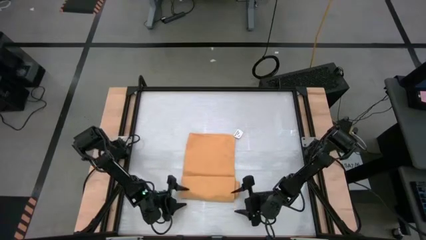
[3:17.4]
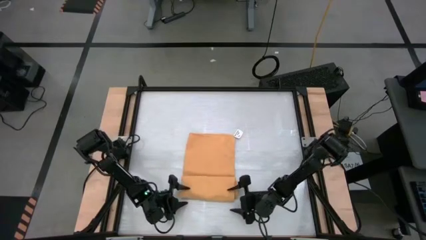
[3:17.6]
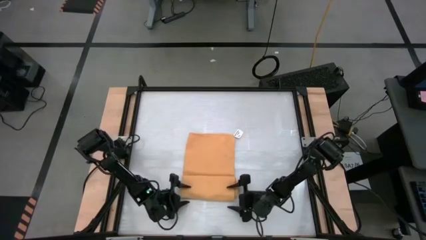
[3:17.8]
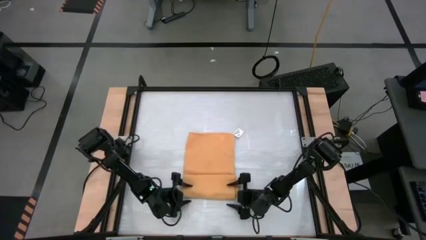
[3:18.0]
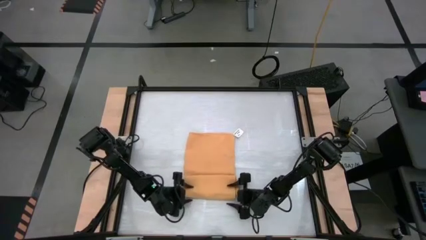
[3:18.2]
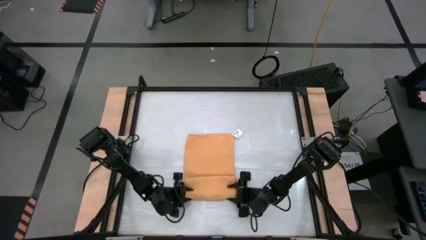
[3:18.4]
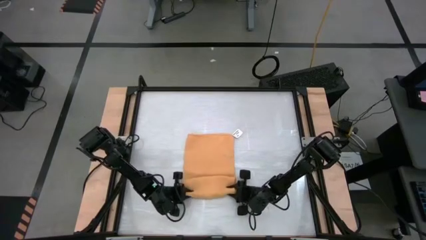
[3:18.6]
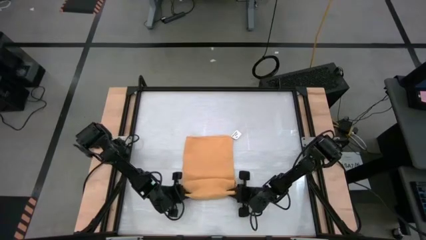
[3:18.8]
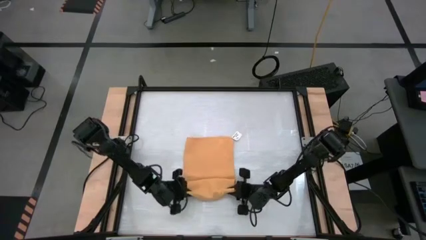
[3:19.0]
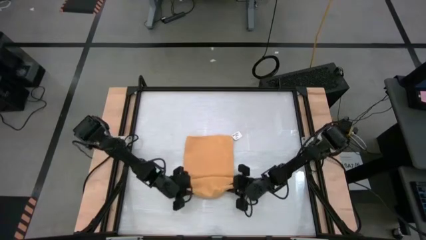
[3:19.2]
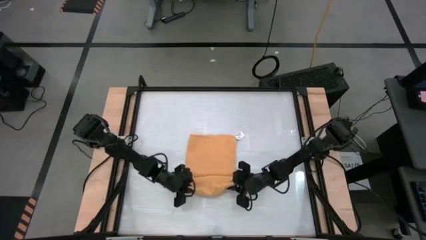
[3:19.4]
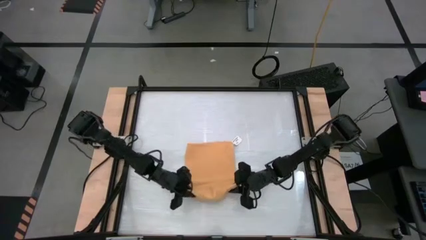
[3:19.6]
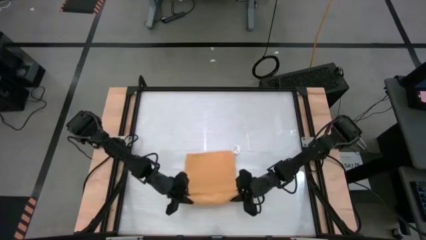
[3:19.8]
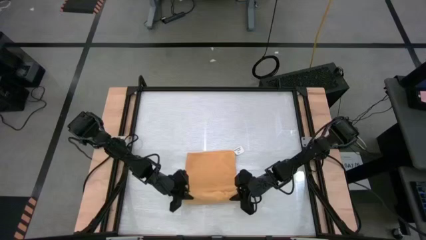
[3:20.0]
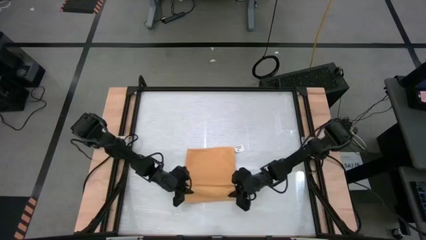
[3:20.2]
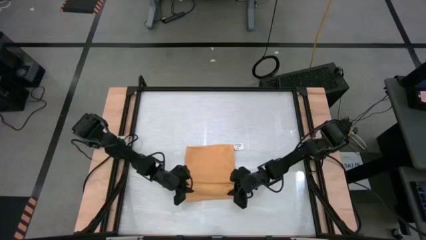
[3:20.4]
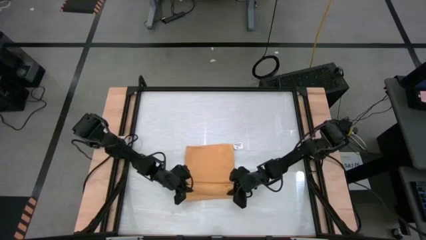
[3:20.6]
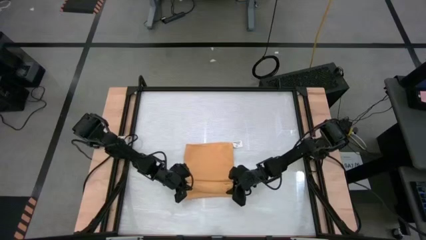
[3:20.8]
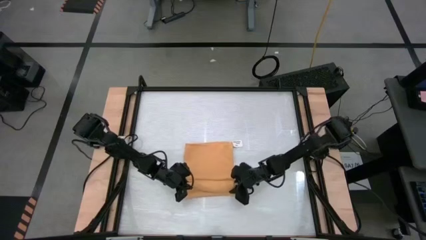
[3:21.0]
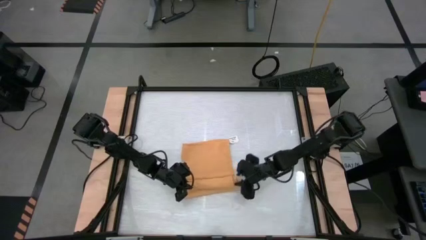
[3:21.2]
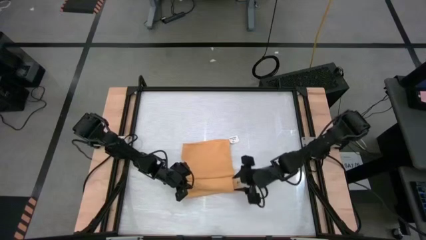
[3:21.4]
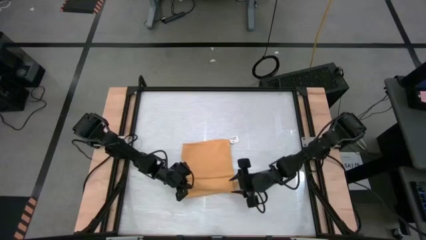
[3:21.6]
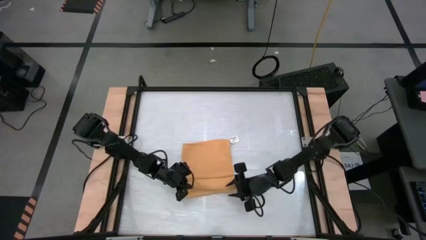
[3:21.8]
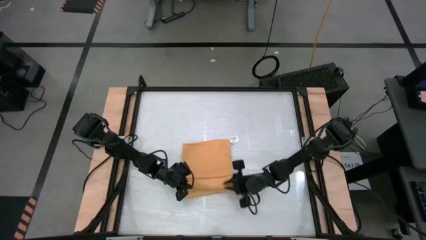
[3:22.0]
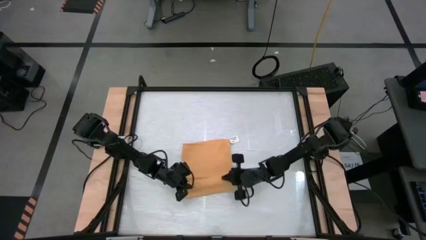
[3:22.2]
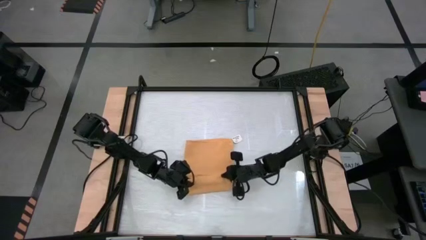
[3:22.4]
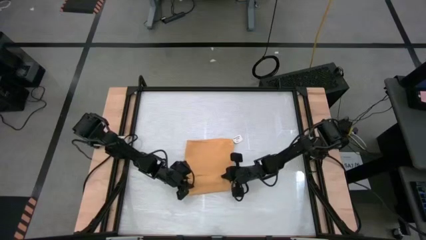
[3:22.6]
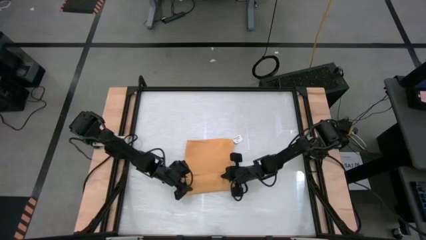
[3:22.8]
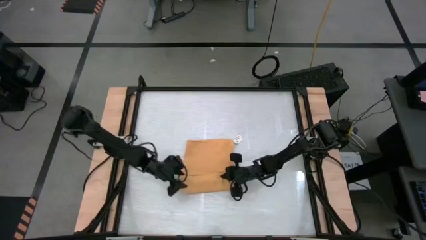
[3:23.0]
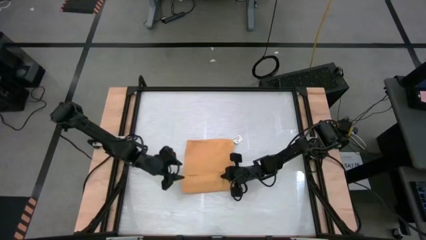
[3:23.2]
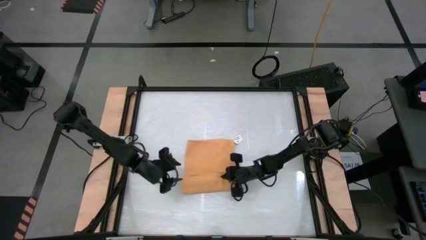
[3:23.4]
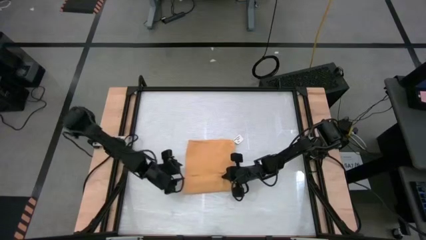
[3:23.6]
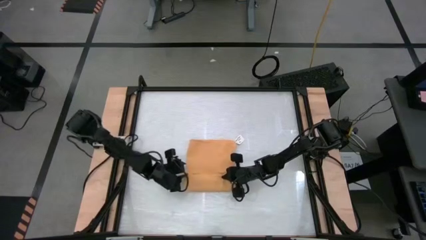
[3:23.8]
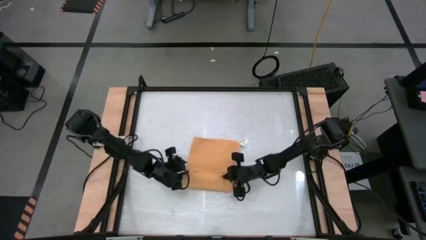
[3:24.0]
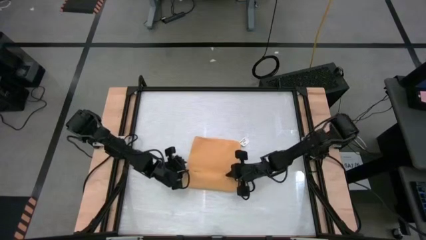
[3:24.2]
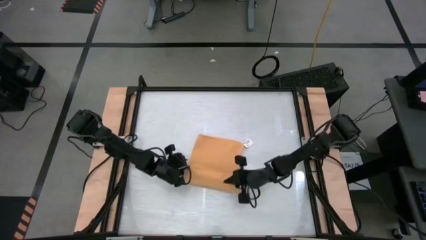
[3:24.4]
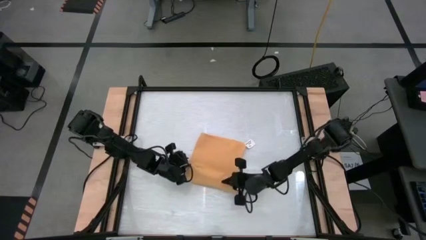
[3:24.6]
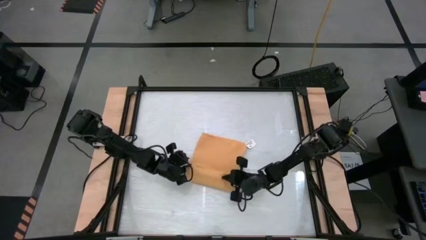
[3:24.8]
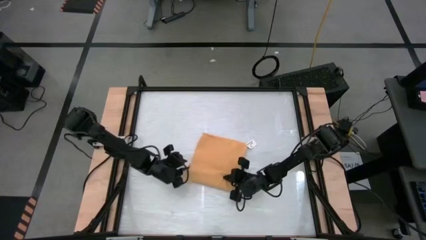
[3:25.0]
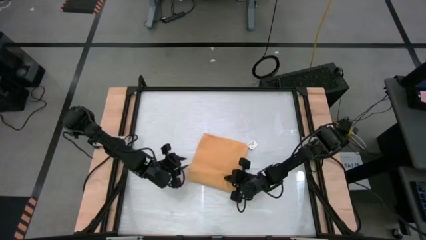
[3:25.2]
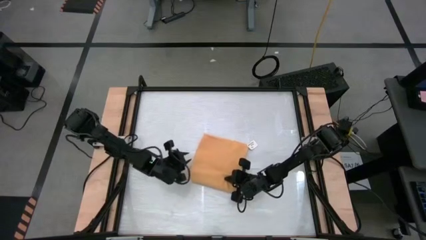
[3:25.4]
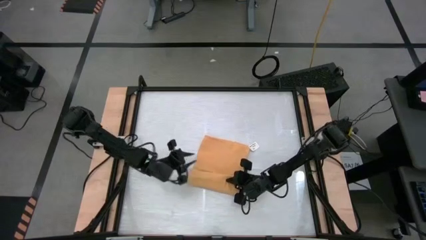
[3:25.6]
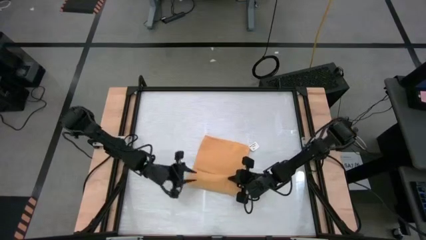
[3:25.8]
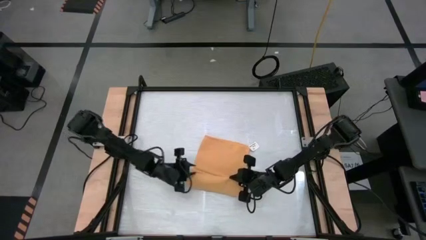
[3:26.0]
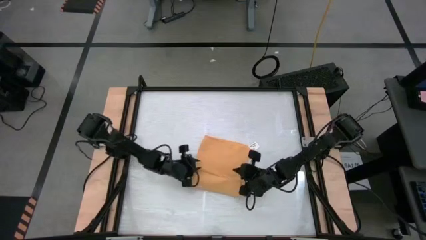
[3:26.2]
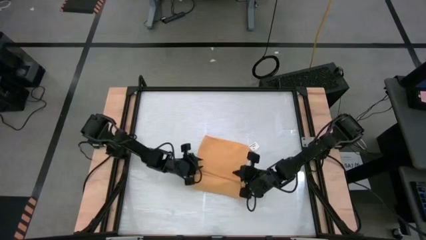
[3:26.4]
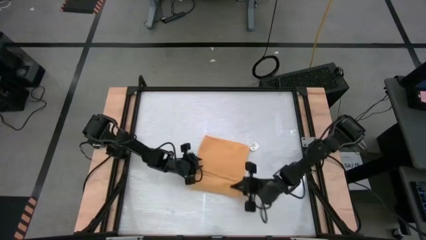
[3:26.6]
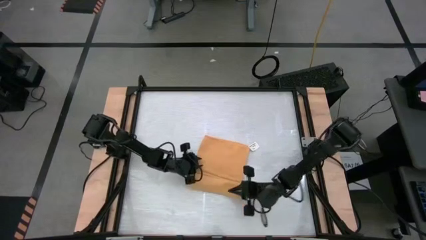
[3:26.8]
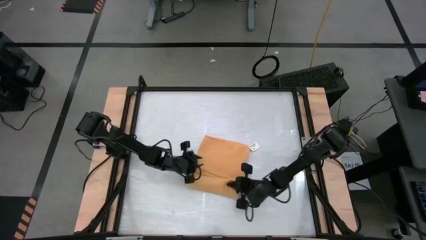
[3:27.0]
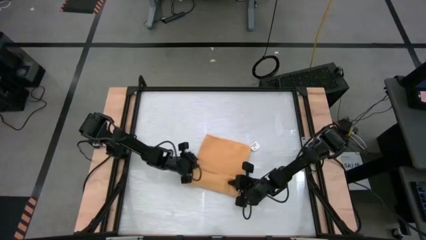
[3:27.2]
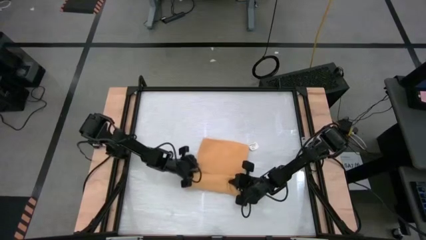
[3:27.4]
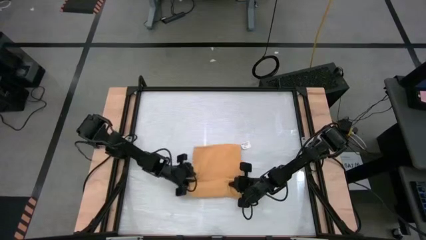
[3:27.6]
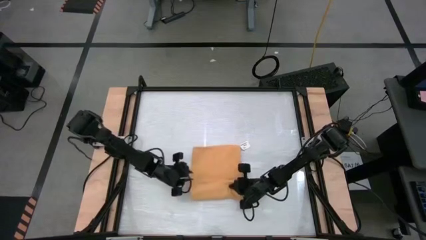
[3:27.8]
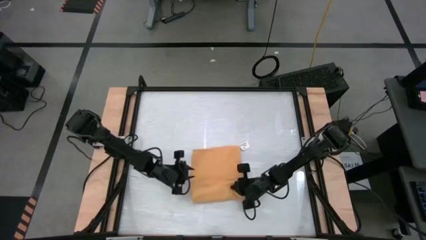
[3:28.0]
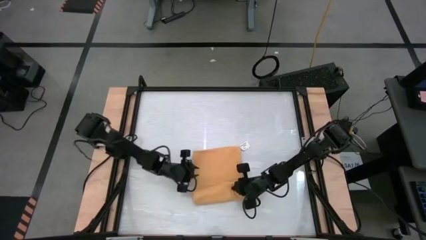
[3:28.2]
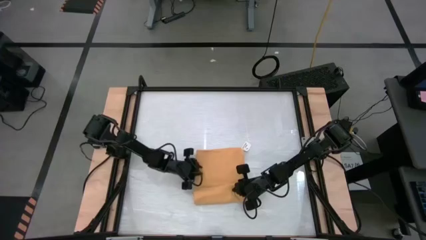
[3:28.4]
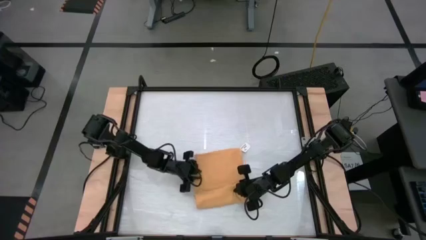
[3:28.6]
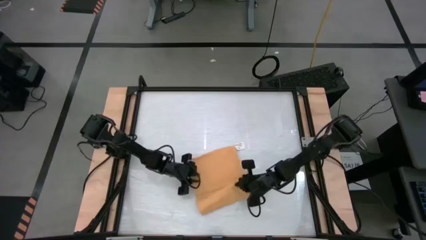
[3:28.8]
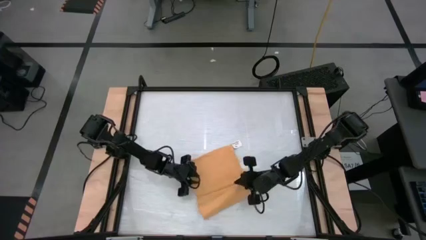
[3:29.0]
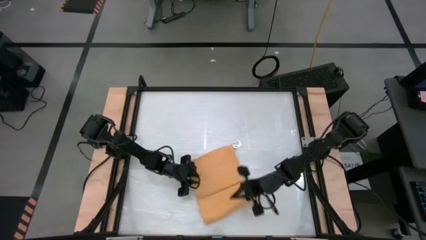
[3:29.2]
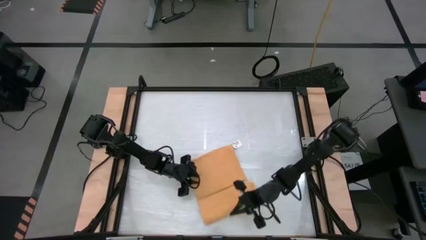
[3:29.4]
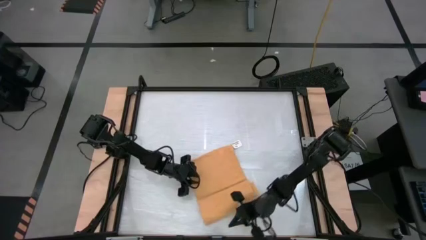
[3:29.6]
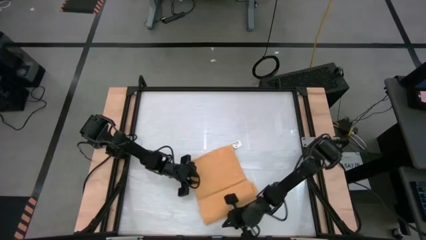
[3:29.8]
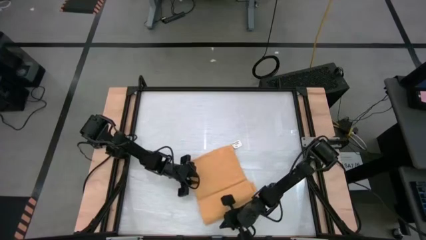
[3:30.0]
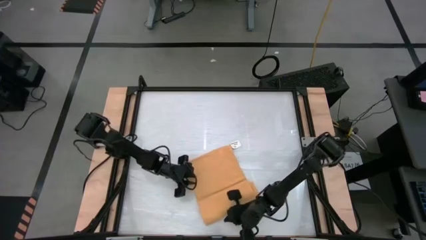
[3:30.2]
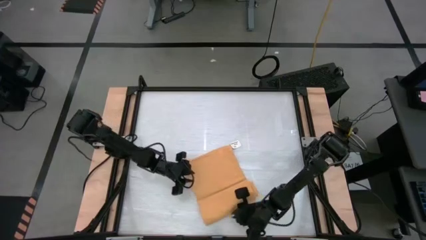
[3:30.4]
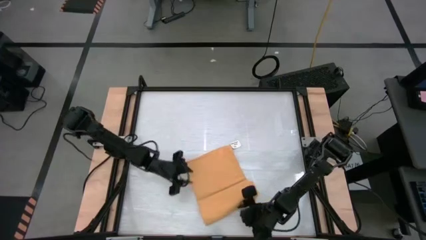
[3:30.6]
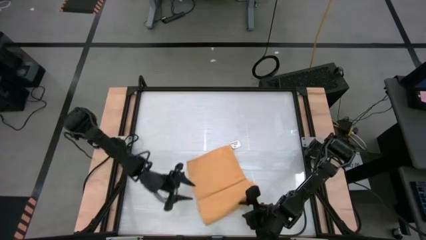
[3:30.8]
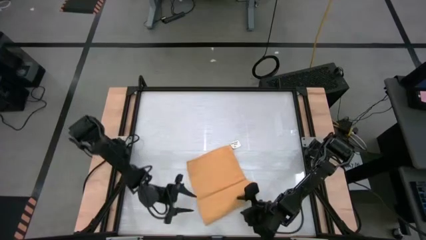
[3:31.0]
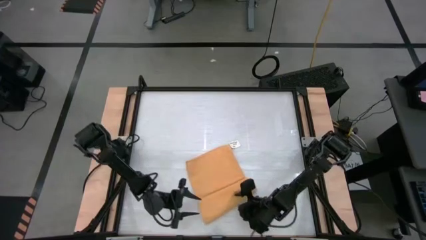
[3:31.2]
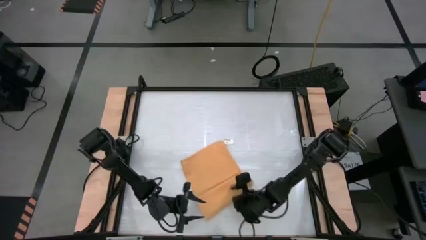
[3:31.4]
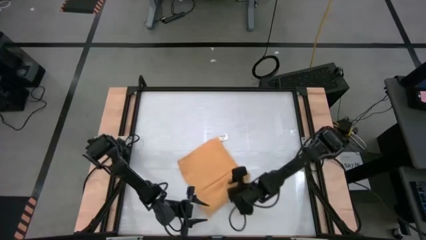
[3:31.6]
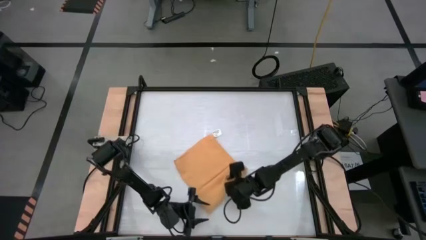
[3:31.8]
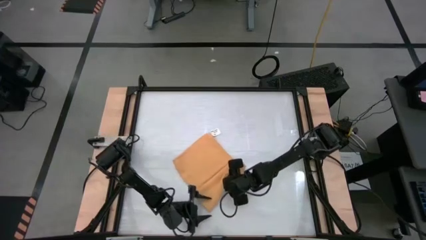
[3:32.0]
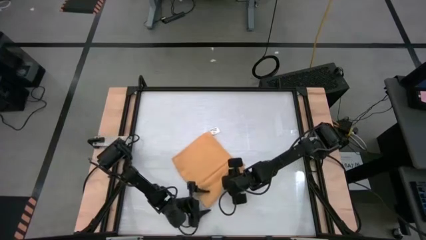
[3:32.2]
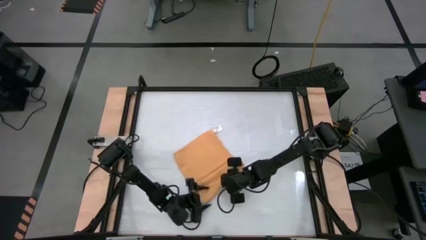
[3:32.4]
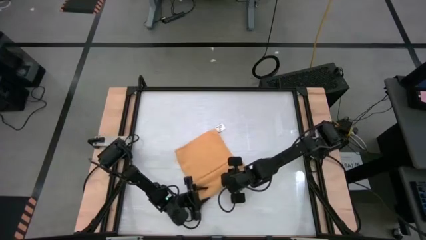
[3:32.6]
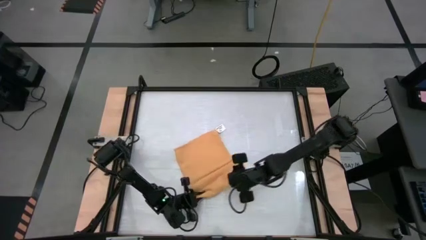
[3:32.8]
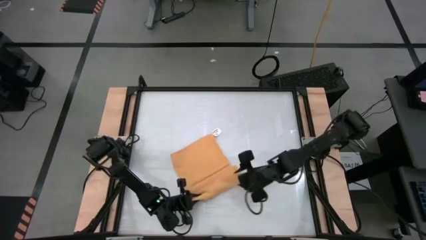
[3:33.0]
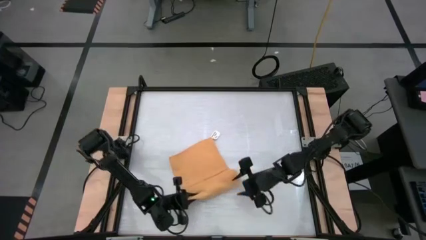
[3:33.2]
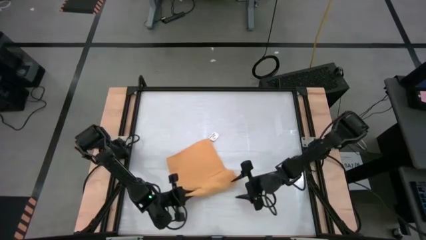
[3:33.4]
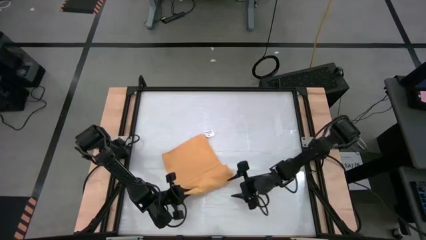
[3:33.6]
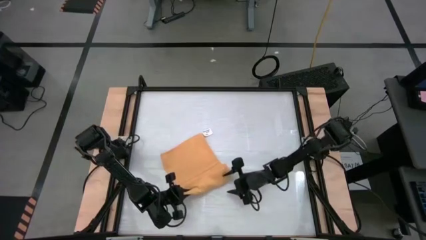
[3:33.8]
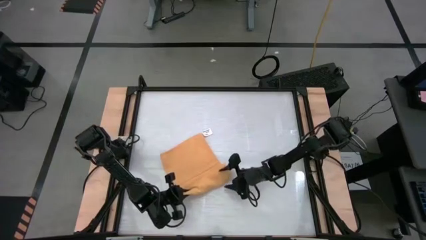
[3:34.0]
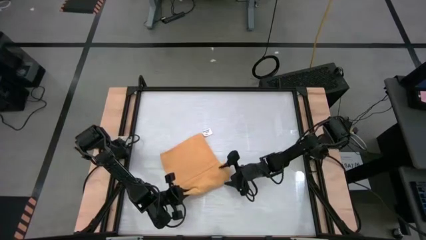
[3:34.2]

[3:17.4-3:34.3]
Task: Roll towel into tight, uniform cylinder
Roll the yellow towel
